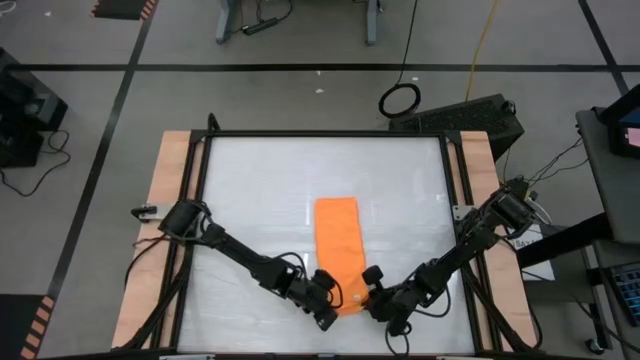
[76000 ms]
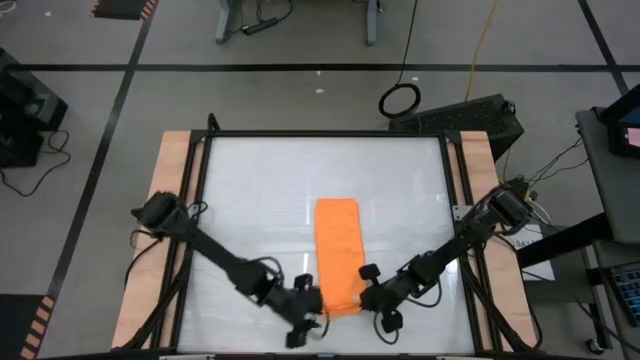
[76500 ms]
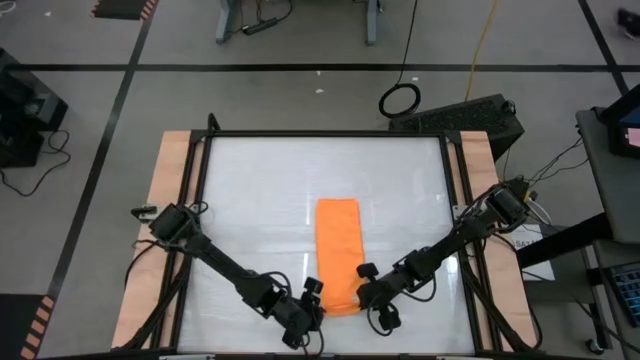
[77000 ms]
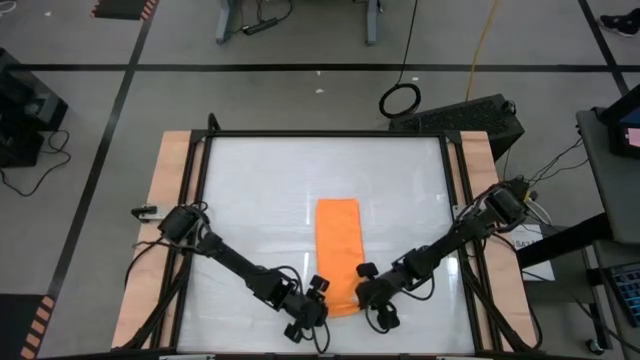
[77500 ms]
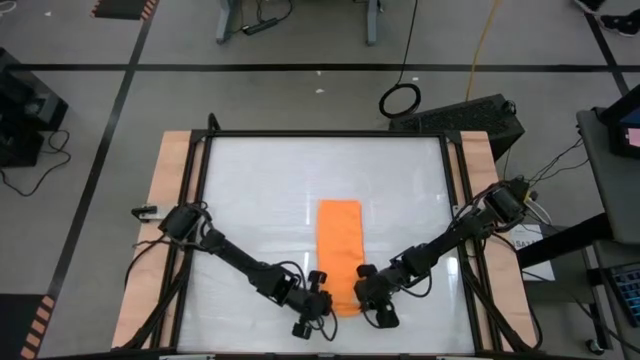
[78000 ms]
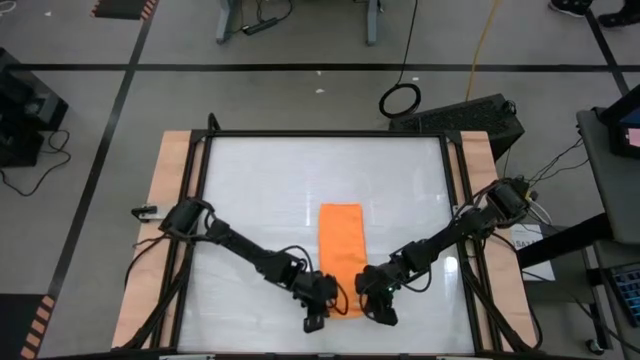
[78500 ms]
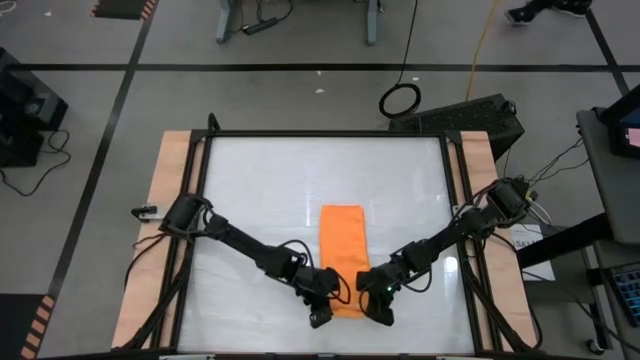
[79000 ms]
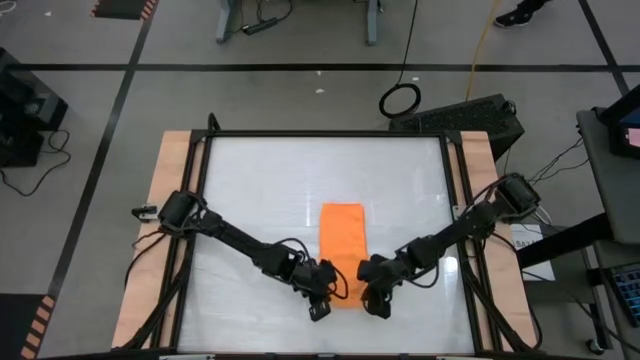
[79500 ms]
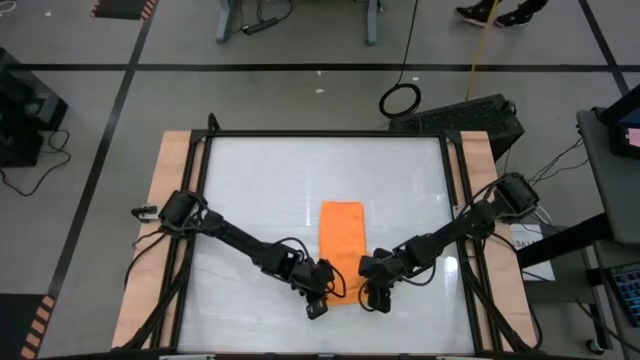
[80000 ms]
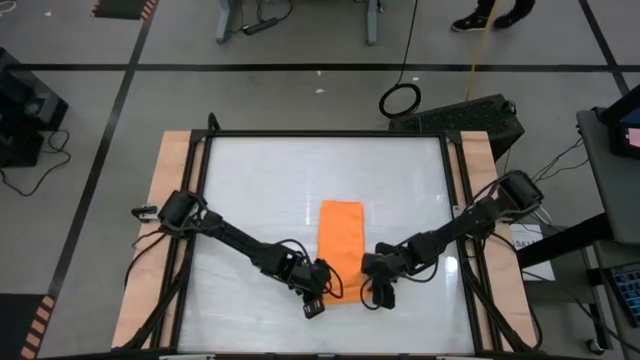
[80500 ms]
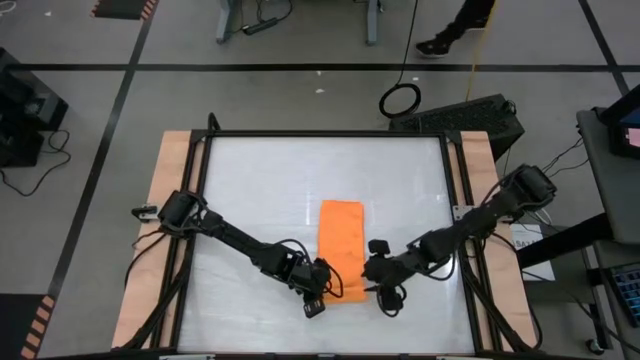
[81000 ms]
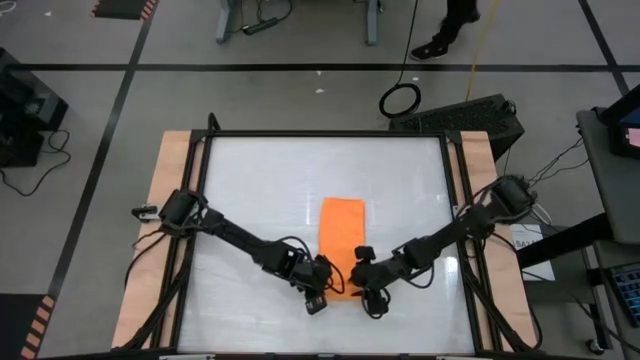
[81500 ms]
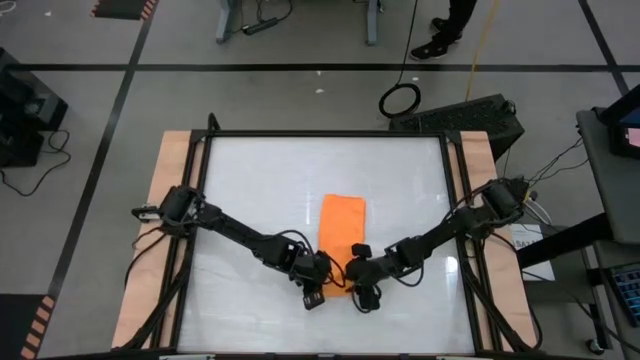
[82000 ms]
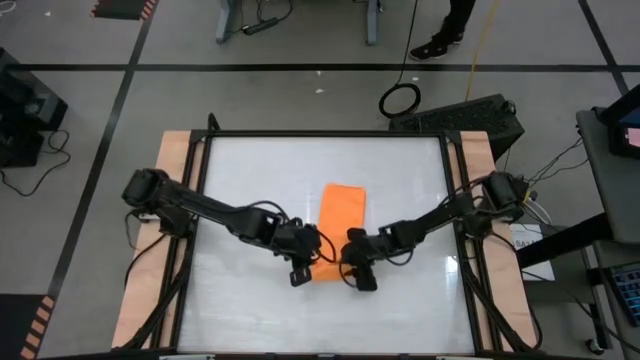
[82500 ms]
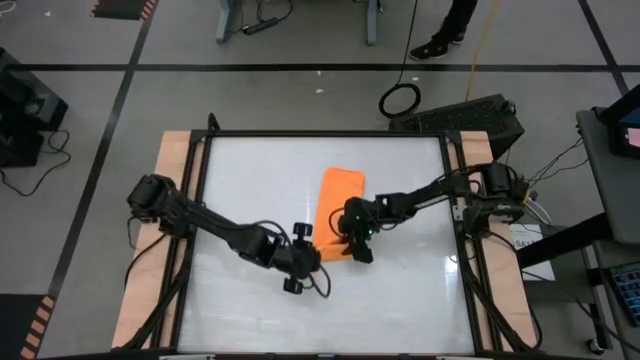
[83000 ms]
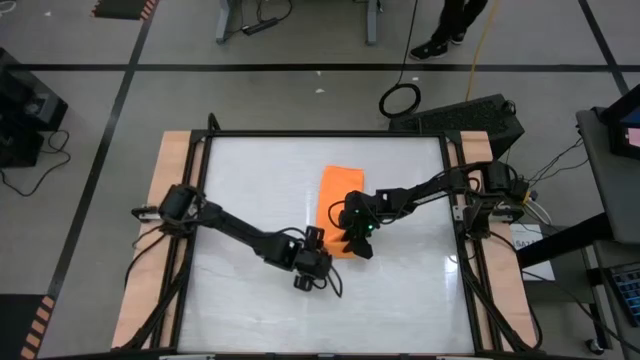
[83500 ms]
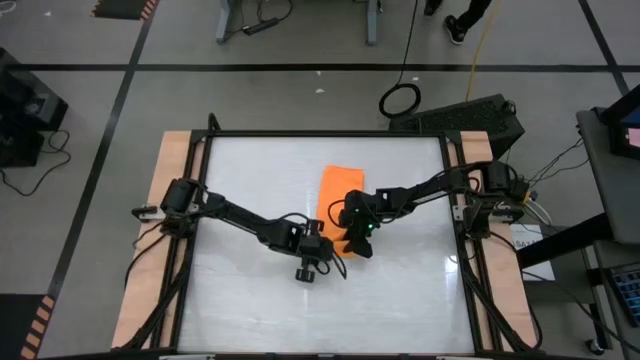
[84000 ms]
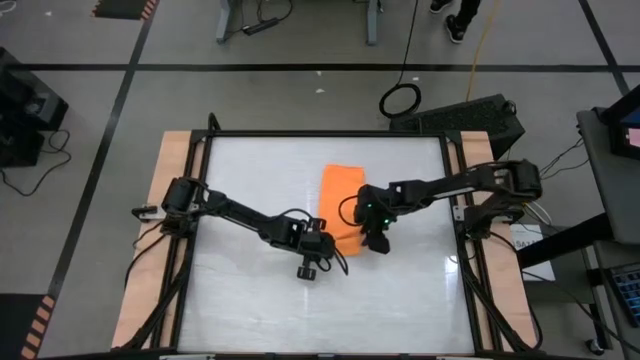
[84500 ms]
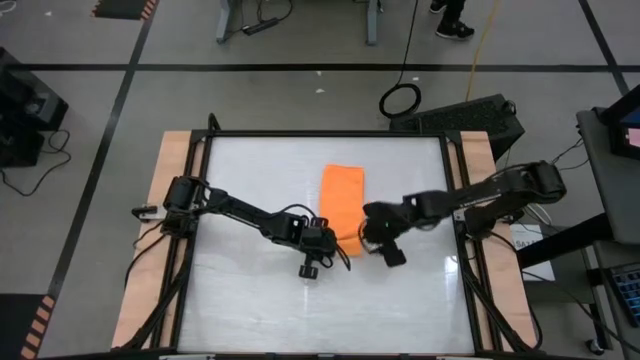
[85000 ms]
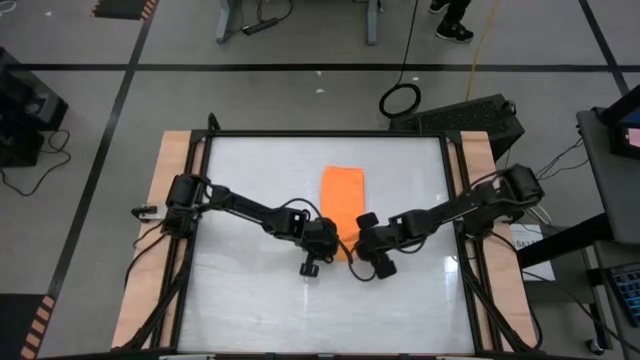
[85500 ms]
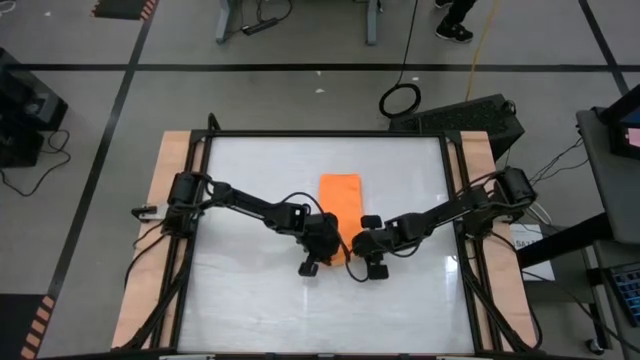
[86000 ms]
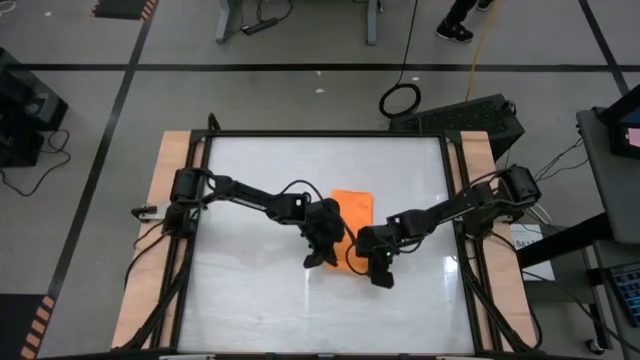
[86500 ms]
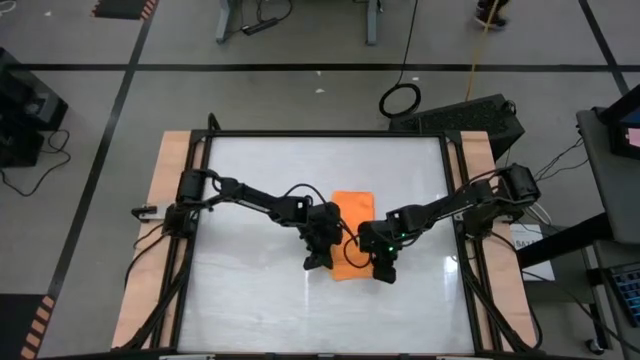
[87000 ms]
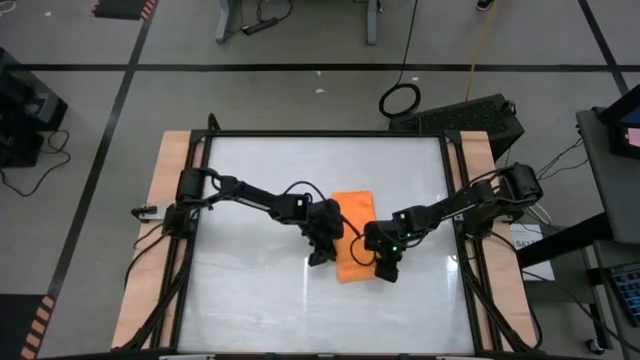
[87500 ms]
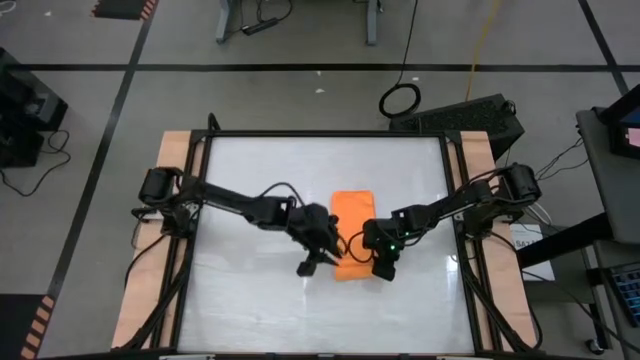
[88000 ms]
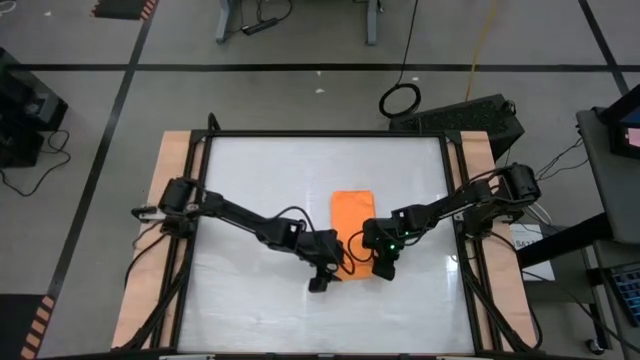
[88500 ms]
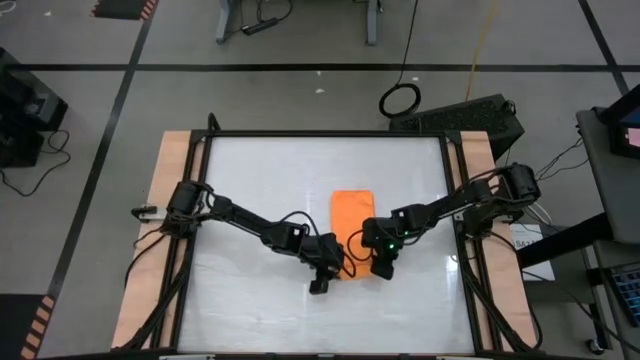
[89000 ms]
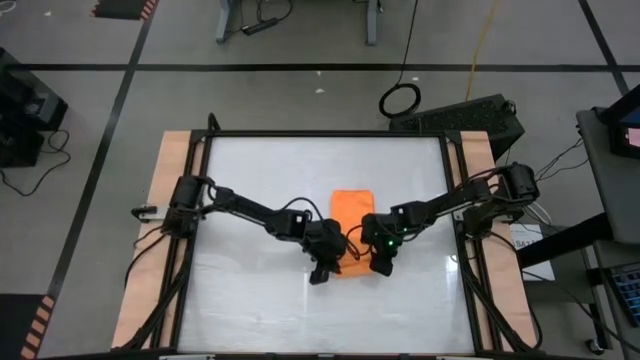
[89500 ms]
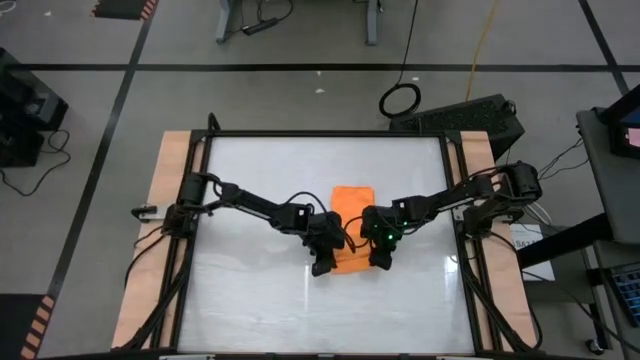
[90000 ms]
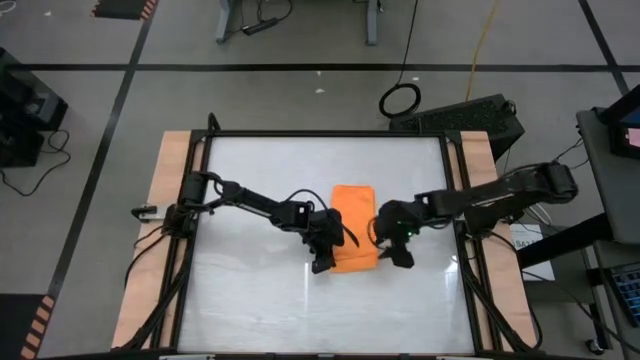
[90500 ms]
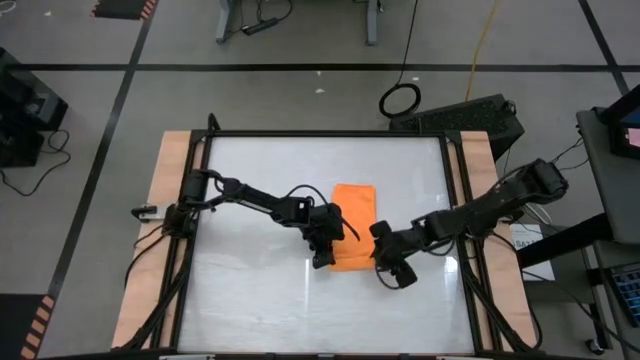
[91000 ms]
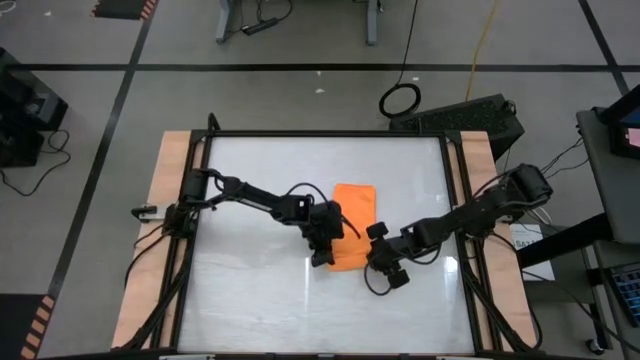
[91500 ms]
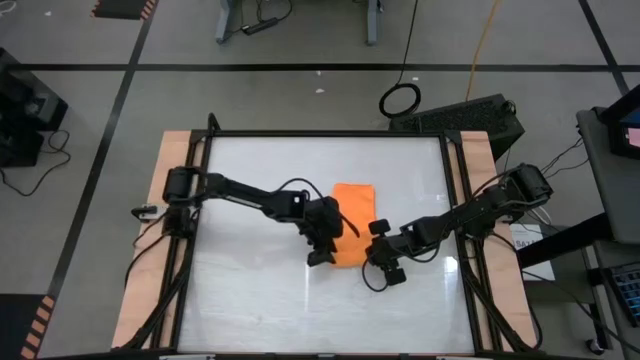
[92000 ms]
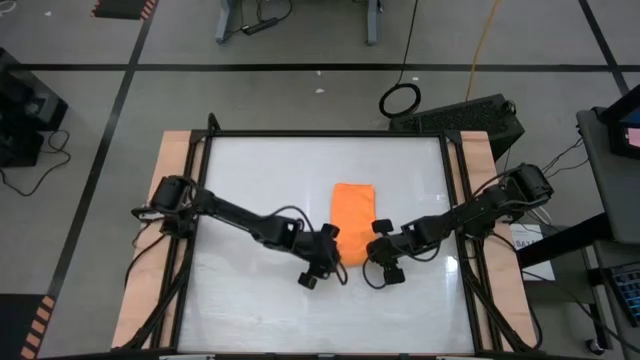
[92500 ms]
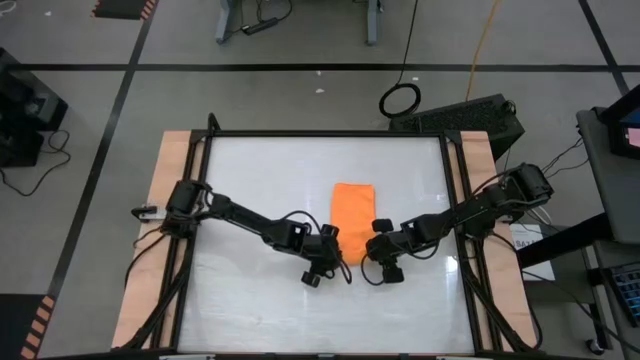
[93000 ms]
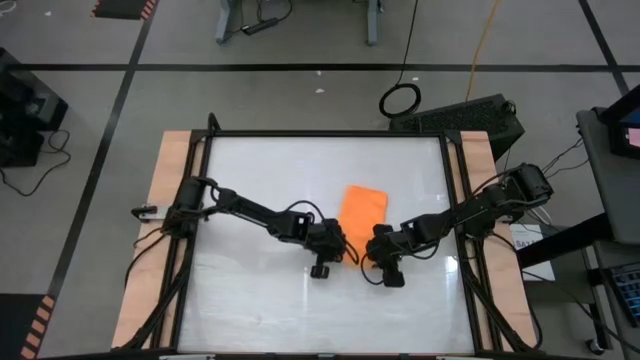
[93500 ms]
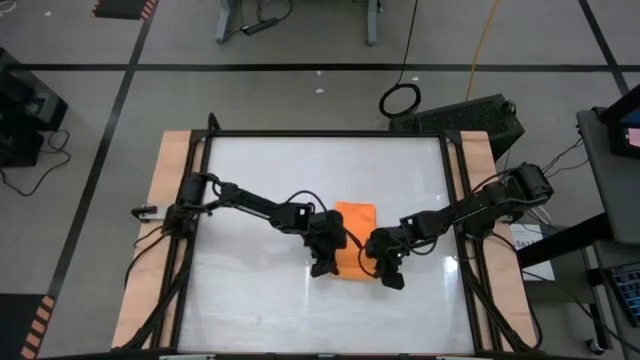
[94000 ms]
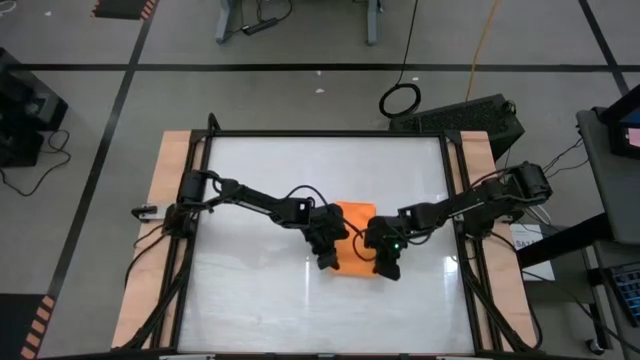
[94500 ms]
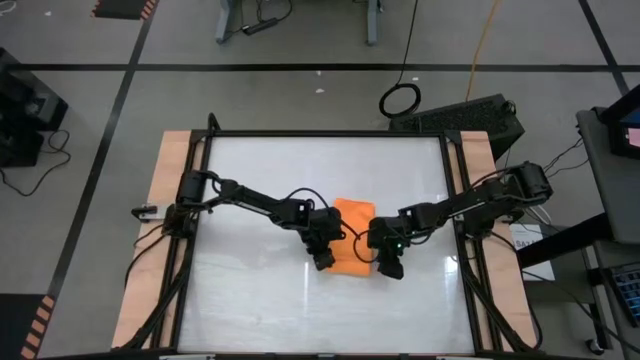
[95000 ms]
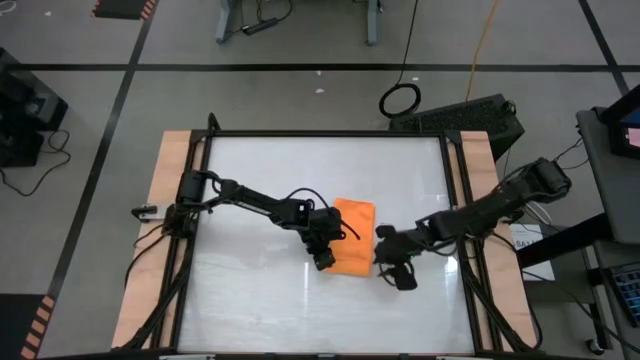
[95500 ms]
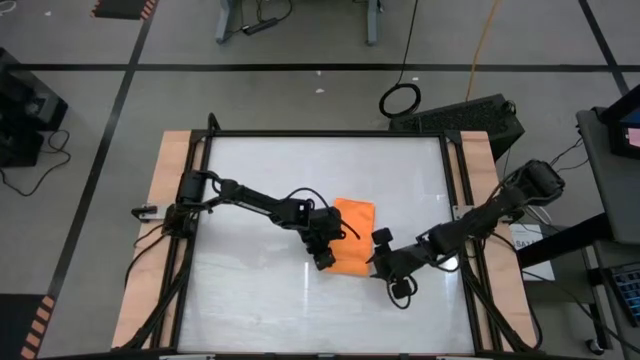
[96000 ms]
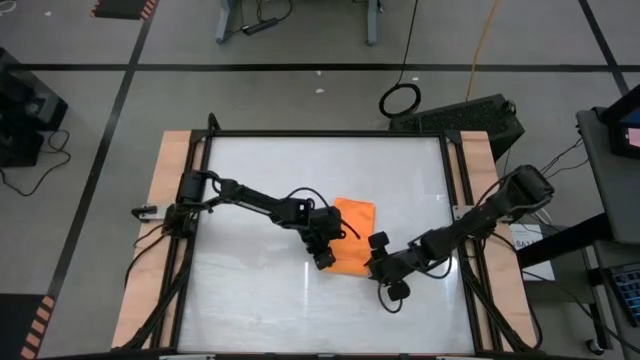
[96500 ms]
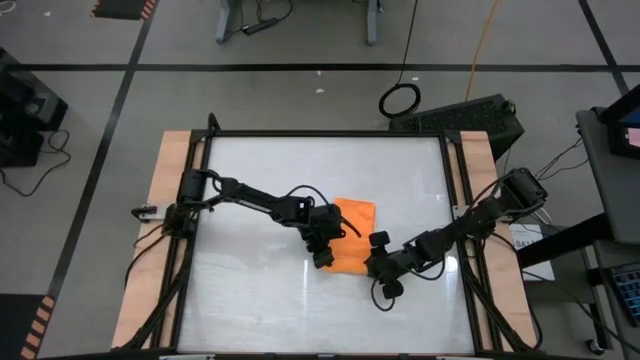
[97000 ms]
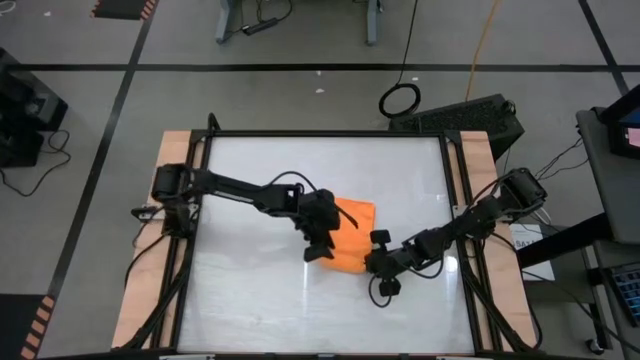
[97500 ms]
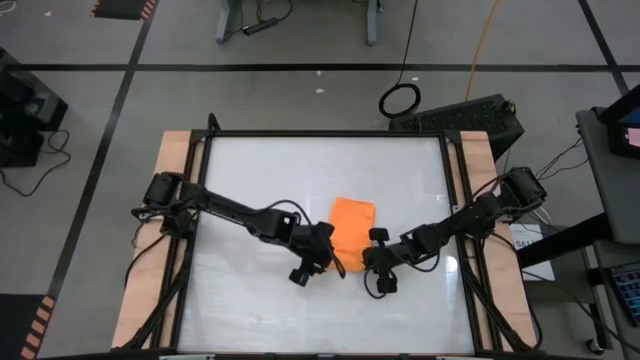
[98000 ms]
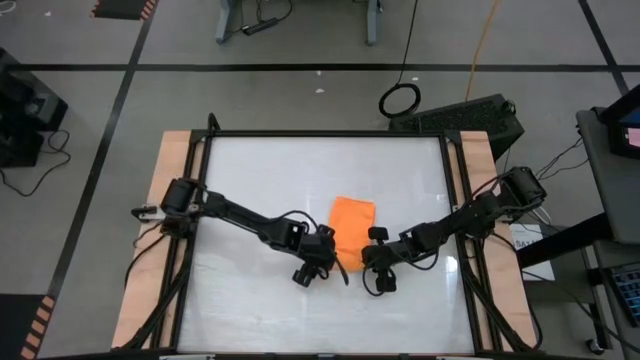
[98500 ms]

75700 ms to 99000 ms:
Task: Roll towel
Roll the towel
